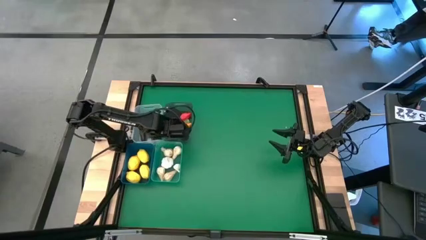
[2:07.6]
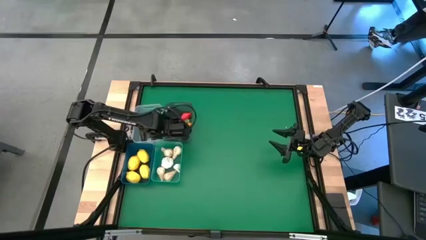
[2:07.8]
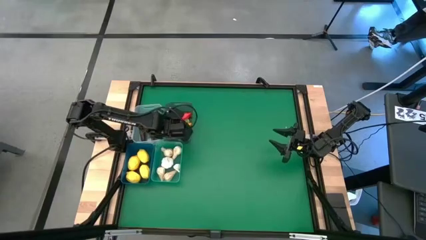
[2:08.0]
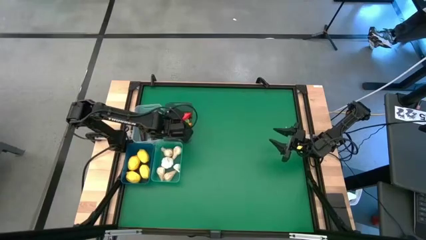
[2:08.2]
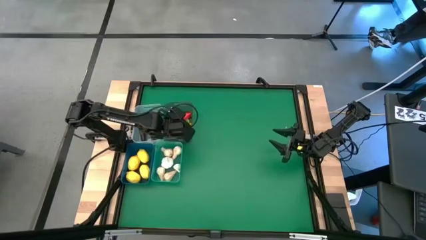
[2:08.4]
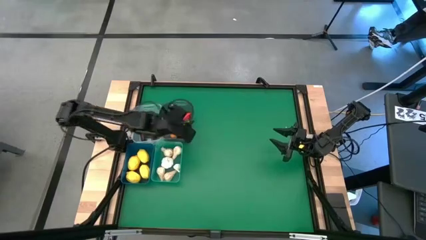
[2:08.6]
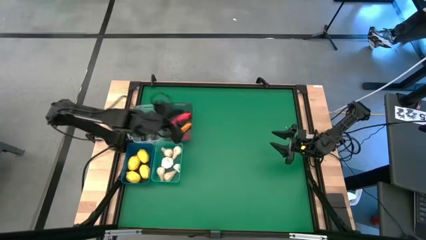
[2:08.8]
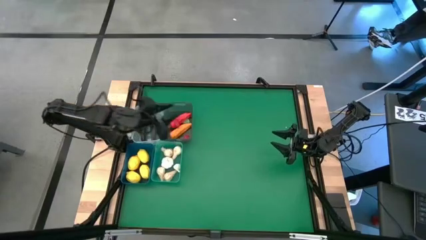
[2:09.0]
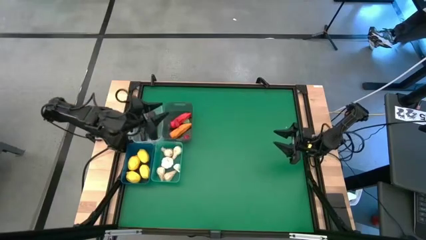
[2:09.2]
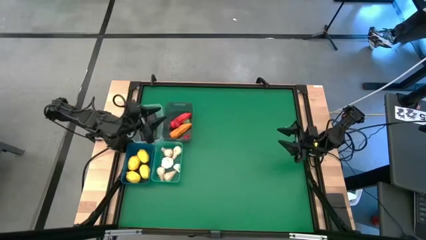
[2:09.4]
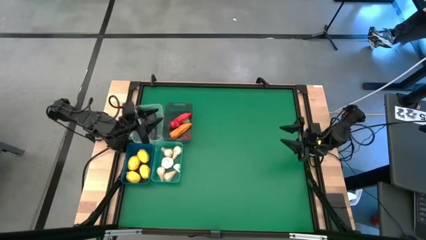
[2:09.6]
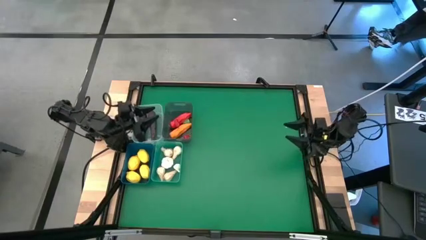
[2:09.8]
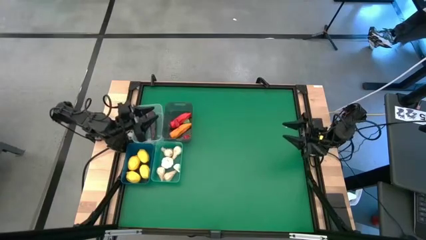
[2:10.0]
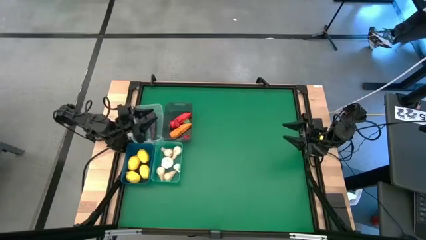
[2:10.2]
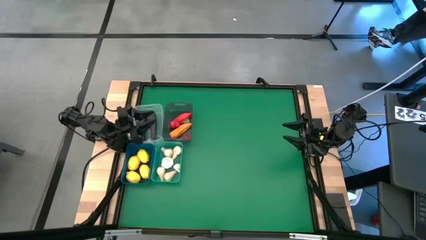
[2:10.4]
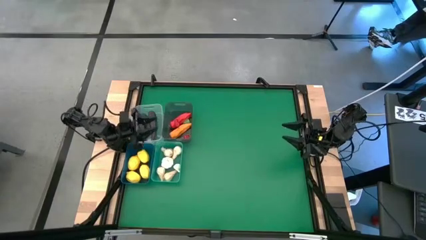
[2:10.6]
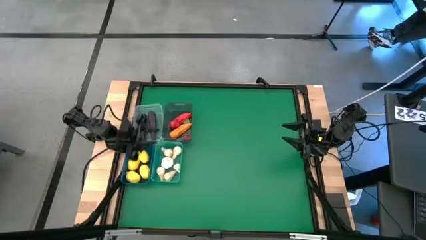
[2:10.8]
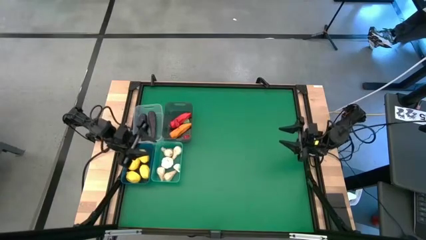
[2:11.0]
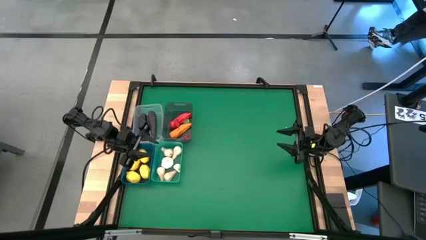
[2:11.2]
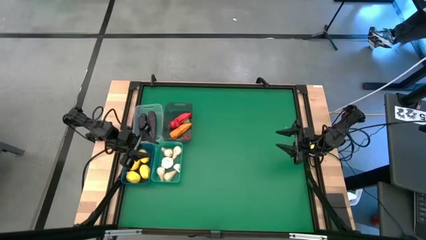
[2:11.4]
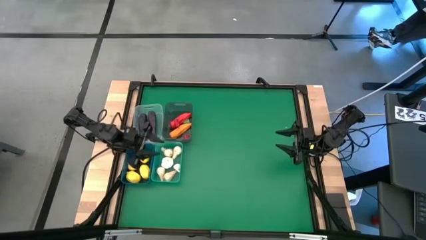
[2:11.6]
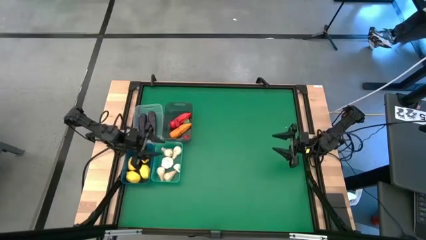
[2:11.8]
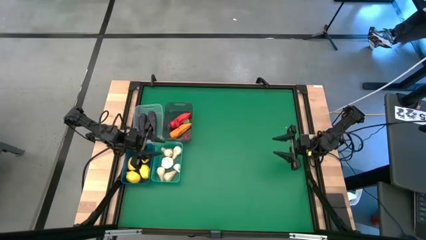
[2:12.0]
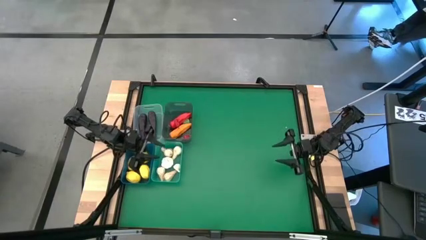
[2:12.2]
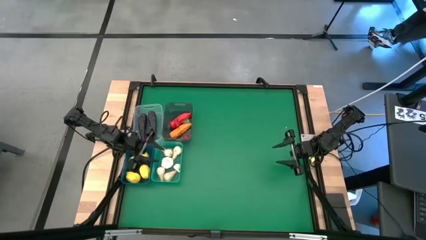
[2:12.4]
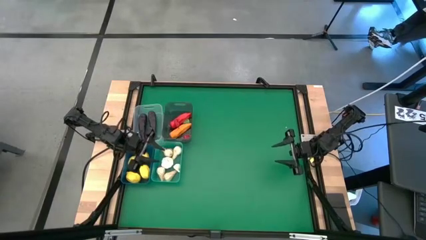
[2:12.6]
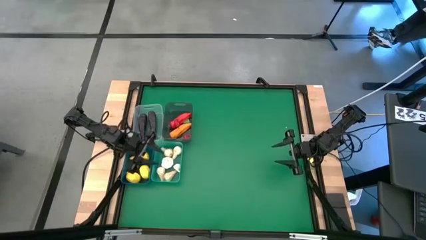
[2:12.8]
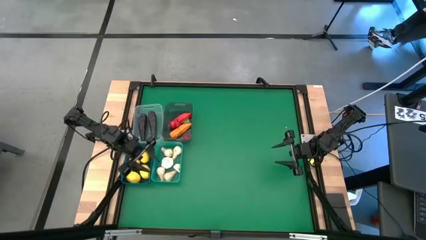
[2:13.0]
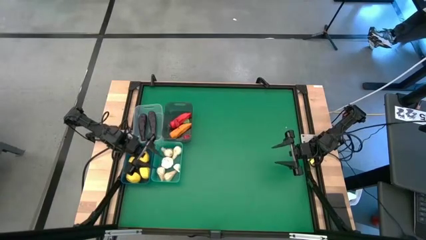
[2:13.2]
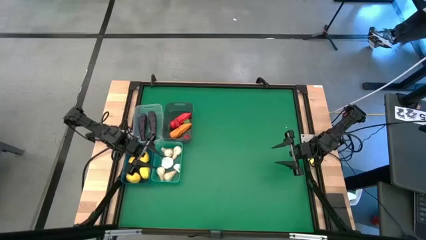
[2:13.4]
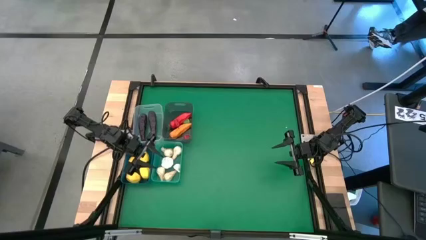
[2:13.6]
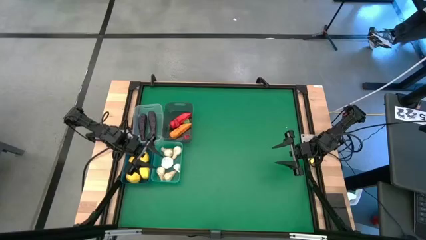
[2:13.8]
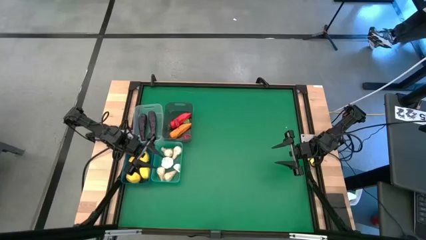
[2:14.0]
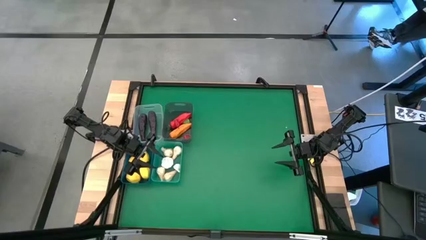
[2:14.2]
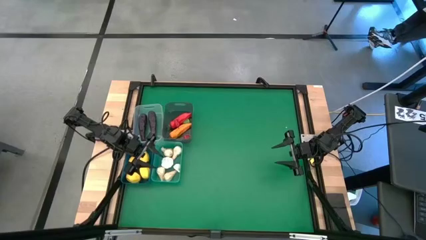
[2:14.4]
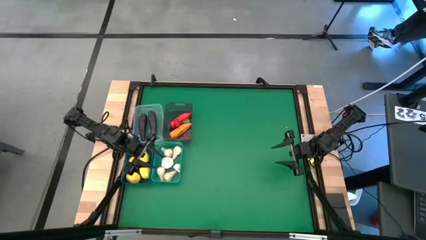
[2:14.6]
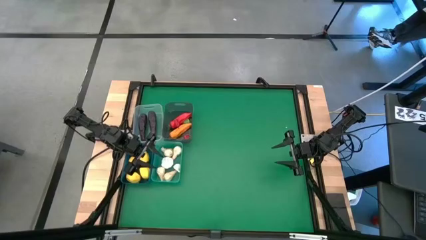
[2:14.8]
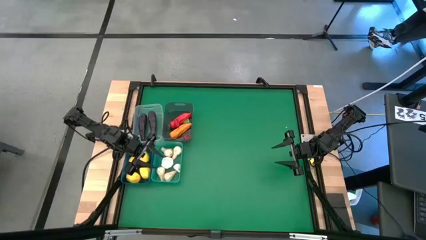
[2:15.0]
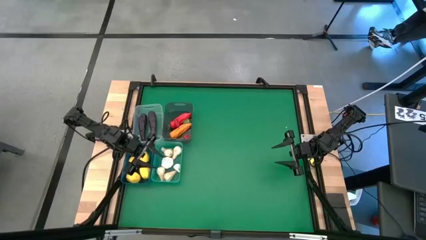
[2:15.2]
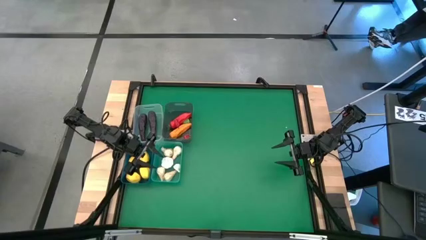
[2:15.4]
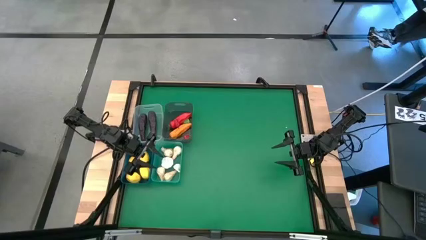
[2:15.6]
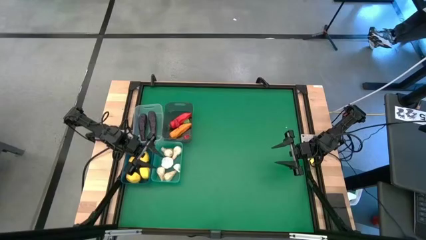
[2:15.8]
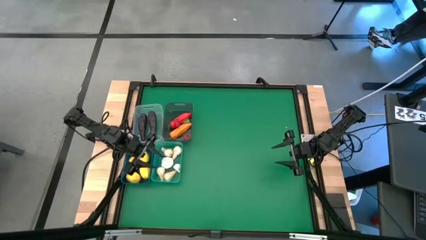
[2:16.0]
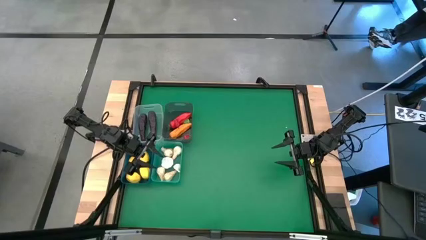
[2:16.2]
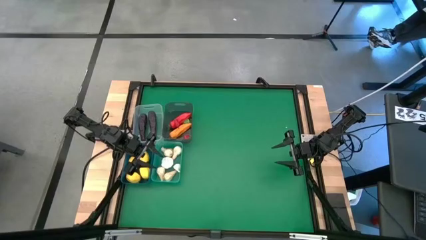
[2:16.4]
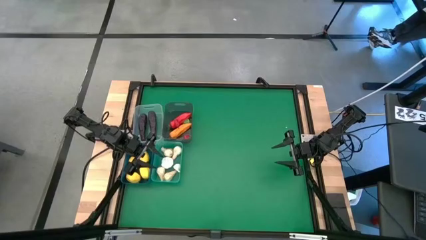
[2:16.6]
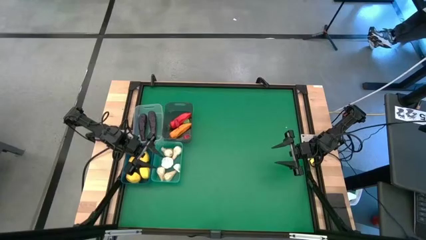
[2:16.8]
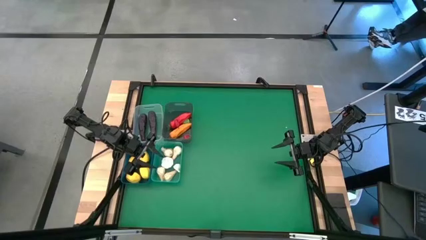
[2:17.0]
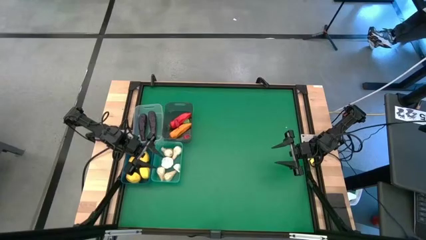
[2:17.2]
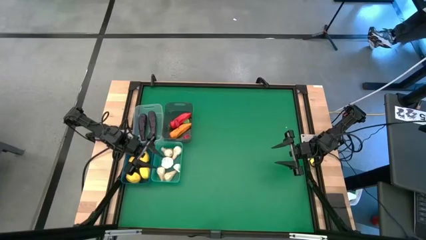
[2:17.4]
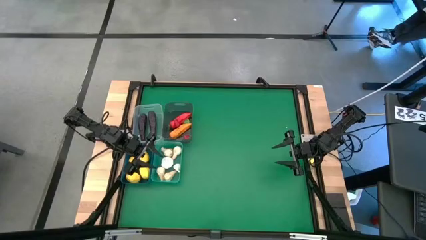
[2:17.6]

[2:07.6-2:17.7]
Task: Sort produce into baskets
Return to Home Position

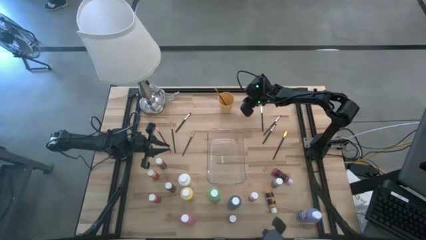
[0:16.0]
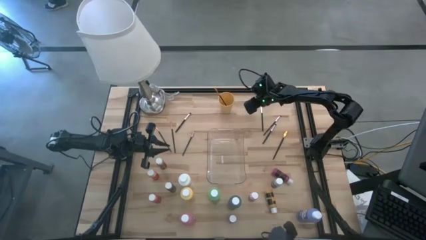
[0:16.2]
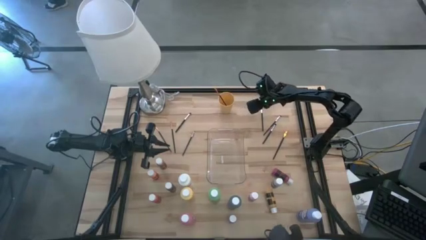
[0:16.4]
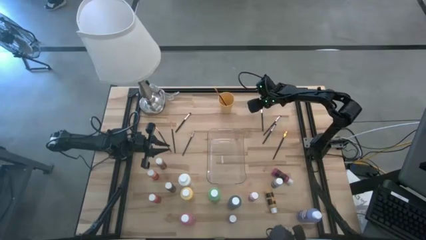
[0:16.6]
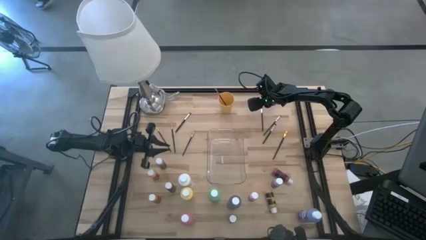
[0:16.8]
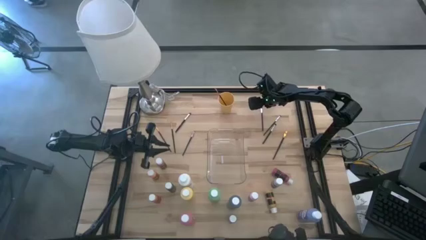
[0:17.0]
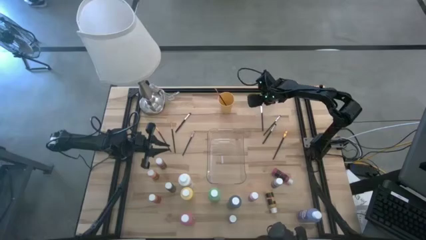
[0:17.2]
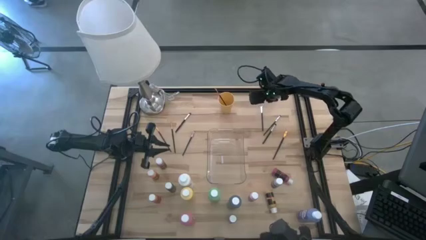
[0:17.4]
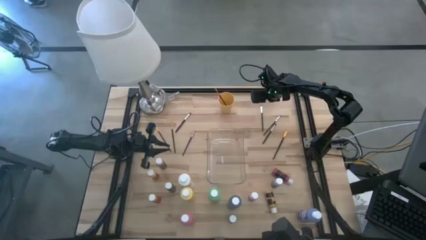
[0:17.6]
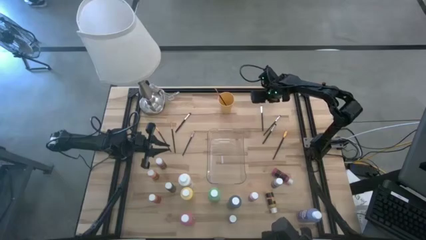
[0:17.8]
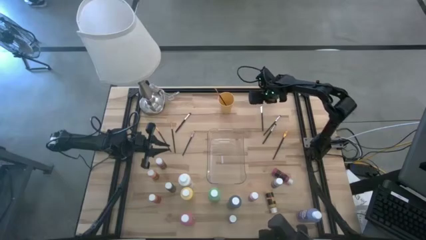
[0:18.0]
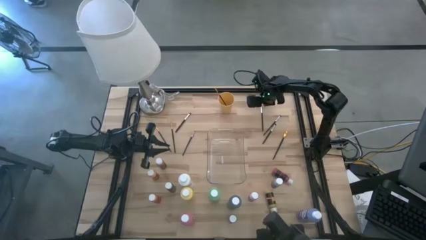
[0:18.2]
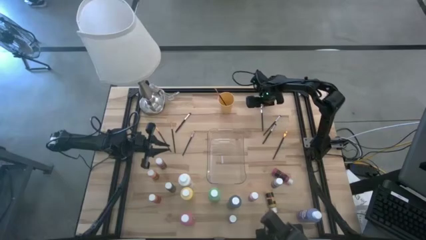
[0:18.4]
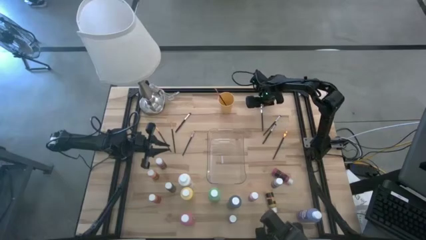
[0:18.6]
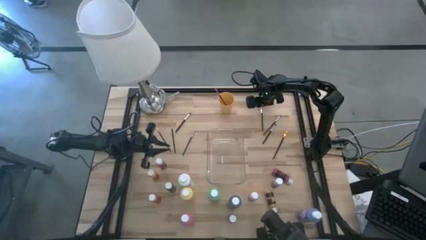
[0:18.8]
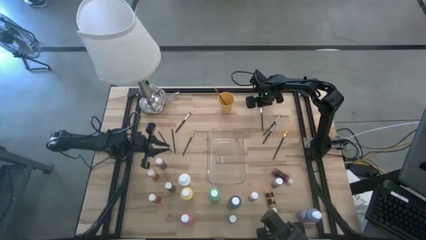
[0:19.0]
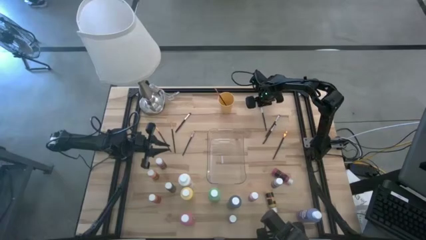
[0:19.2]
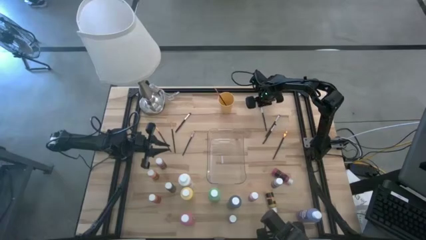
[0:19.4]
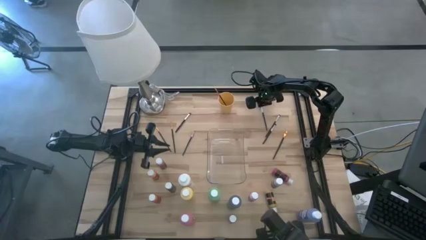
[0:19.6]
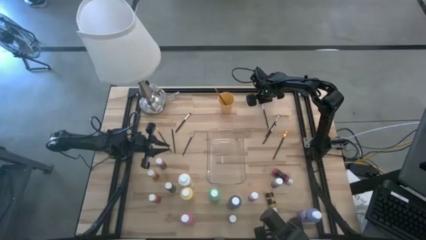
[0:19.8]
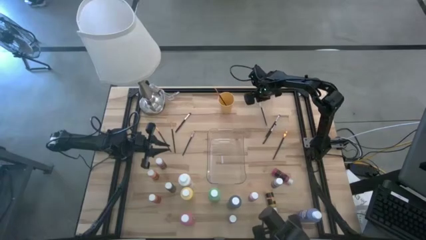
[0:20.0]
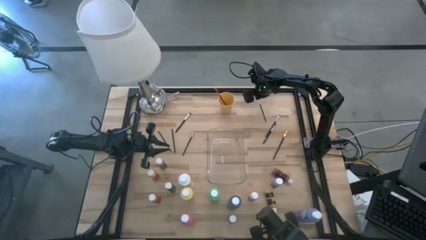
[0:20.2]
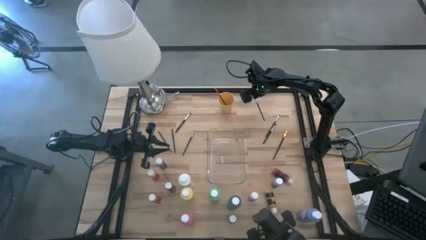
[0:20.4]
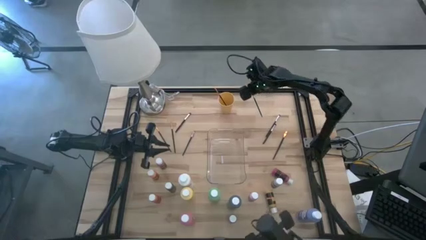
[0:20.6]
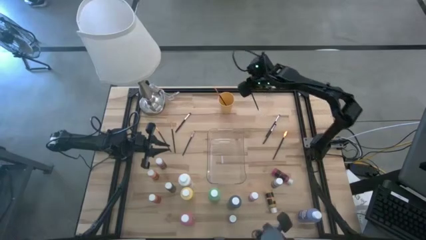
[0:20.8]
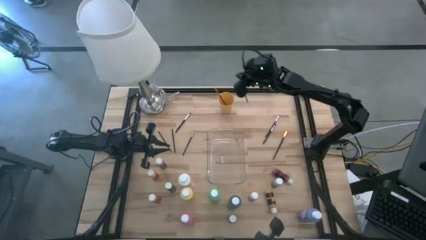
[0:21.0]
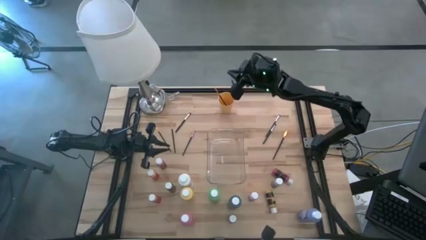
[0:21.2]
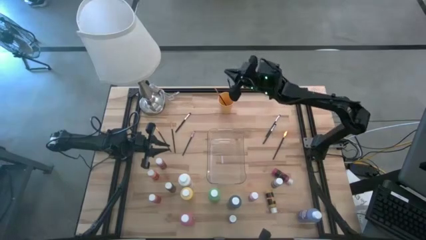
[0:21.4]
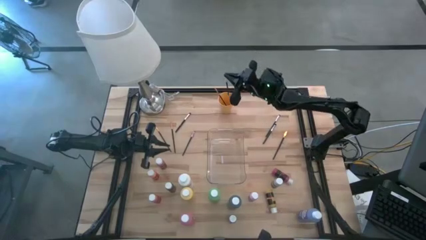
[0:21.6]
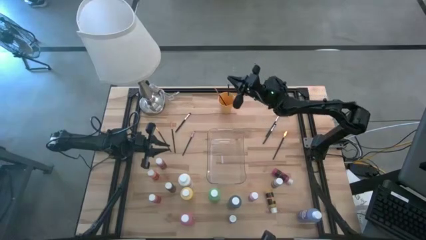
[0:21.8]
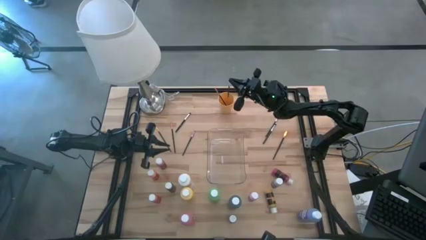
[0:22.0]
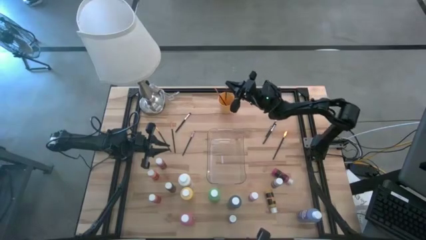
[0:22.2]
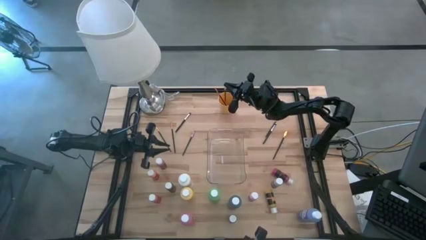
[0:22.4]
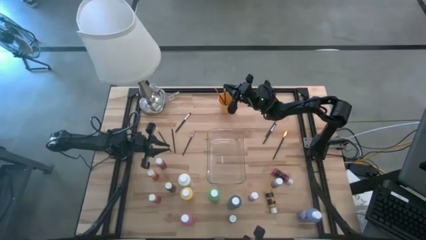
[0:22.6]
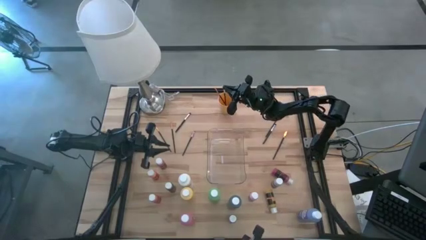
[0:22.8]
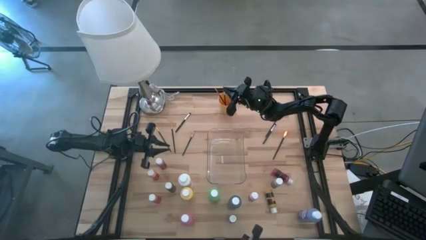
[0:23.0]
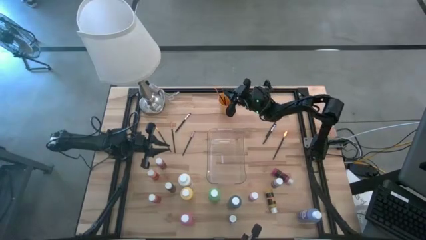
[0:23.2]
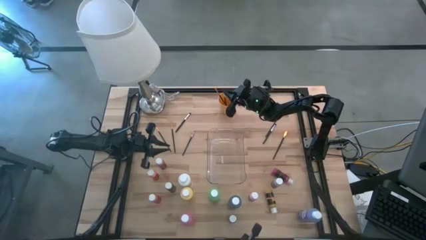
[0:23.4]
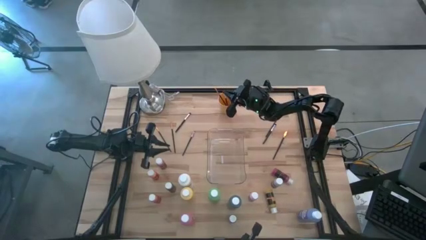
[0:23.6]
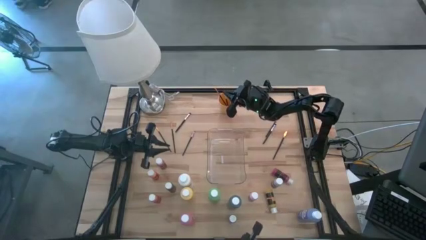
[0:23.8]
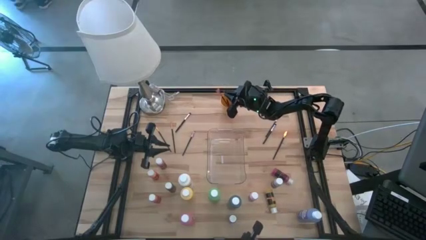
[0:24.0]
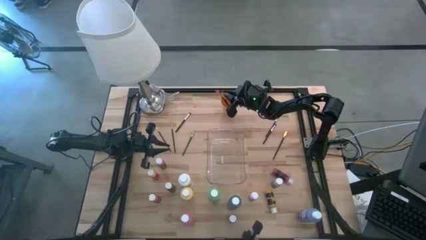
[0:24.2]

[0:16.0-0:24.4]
Task: Pick & Place Paint Supplies
Put the silver paint brush into the yellow cup
